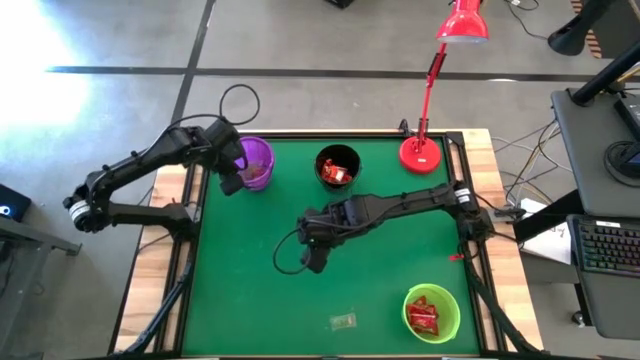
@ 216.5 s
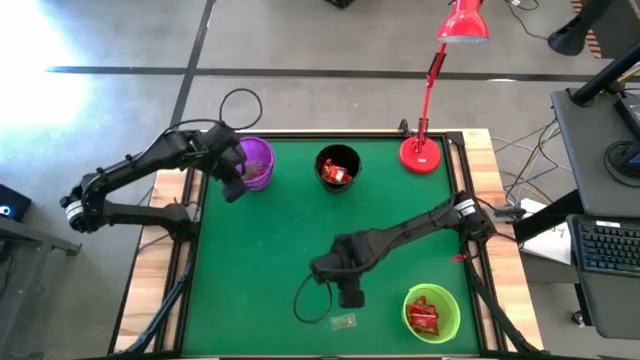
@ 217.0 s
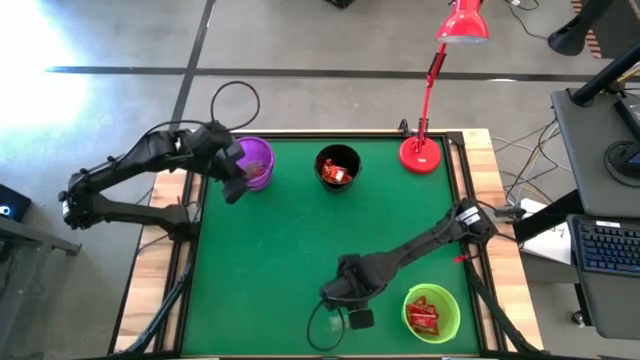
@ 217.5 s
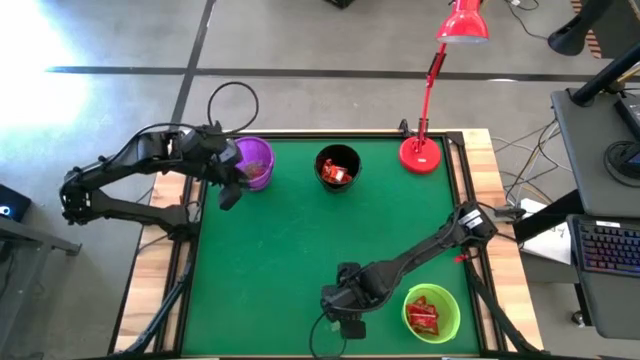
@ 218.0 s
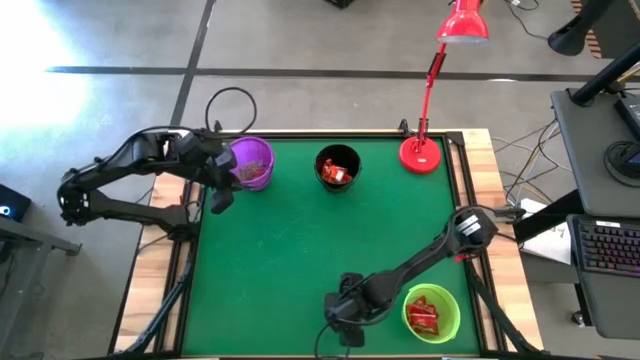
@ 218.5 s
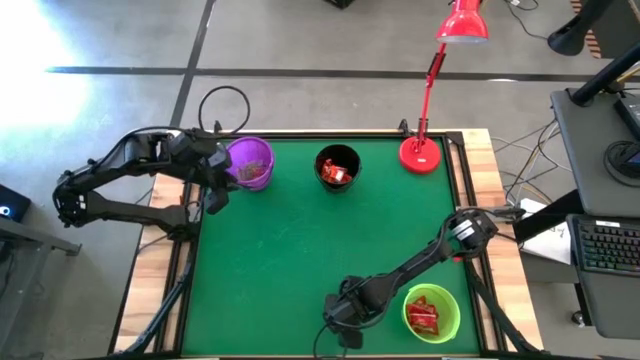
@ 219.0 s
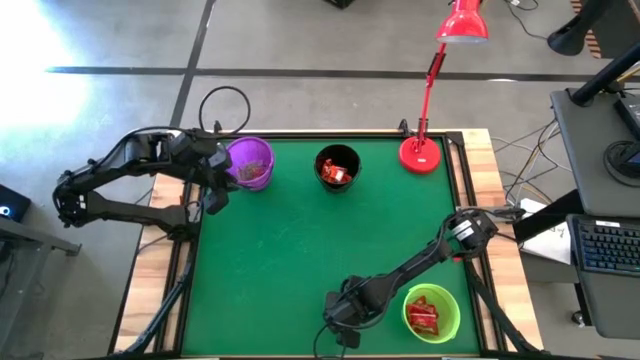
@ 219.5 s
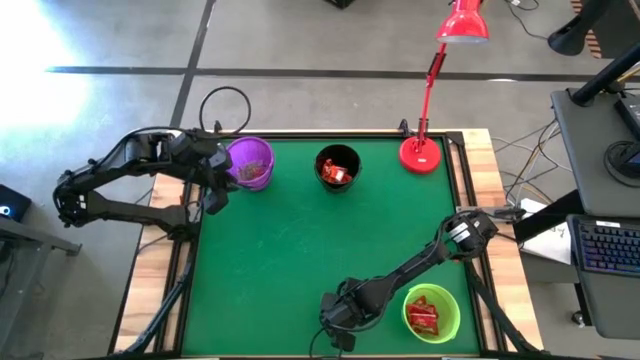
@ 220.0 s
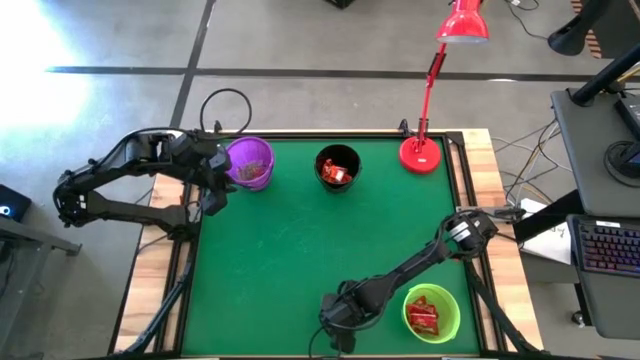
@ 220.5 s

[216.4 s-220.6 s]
Task: Sort candy
Put the green gummy into the violet bucket

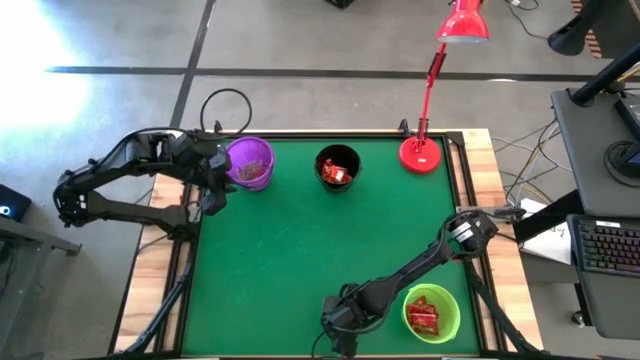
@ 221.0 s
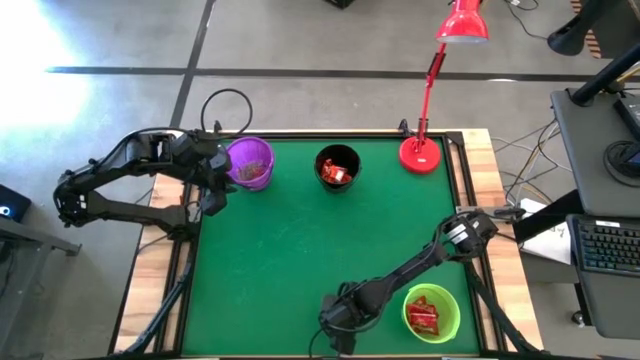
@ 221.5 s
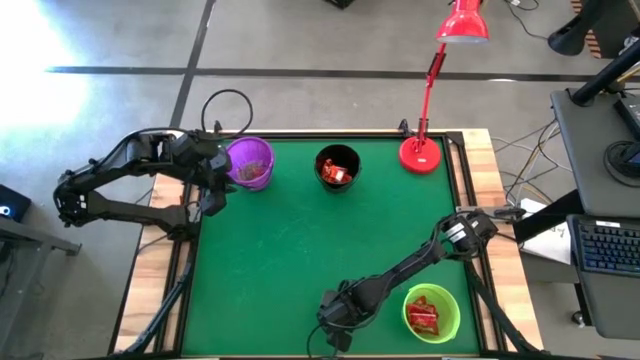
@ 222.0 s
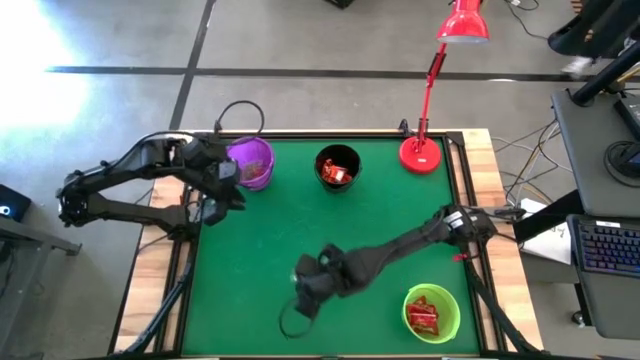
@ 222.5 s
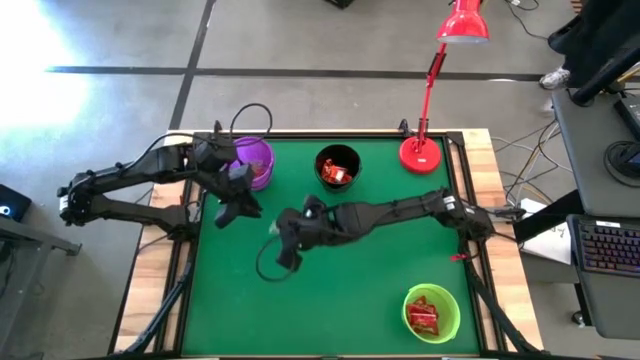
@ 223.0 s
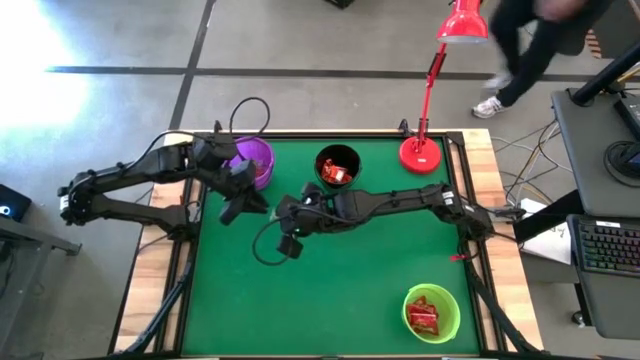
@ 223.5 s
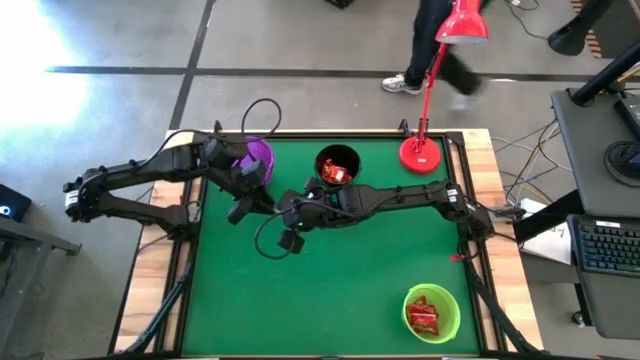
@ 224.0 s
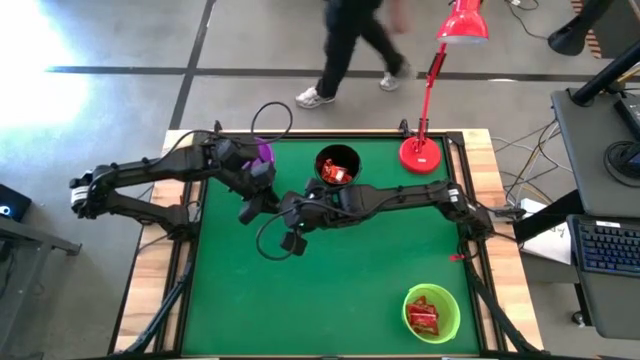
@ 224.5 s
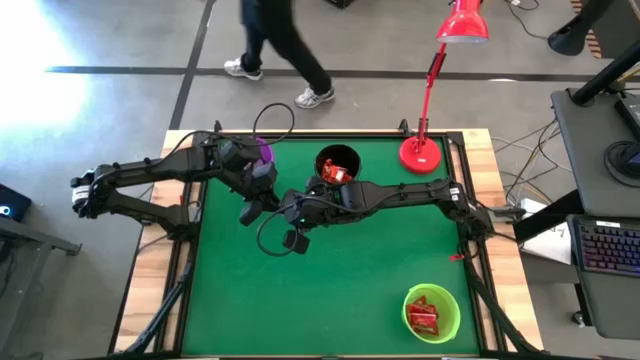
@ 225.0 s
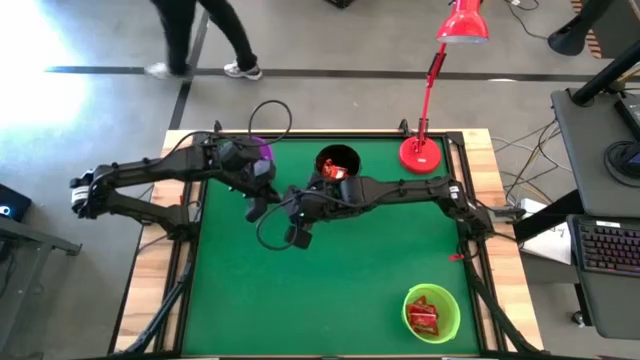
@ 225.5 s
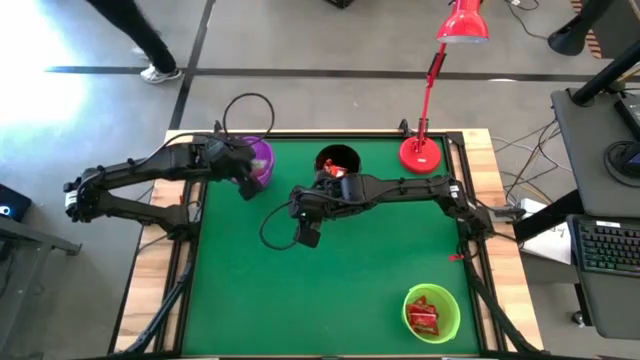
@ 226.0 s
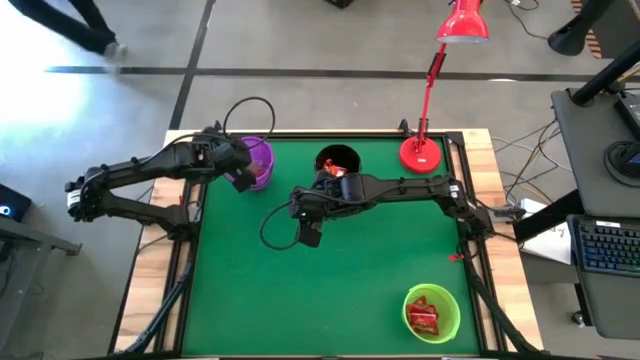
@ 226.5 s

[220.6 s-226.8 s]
Put the green gummy into the violet bucket

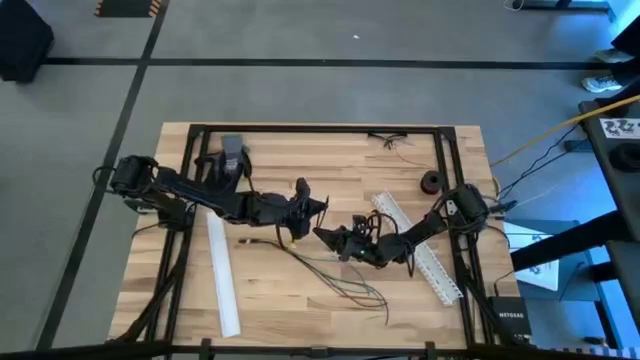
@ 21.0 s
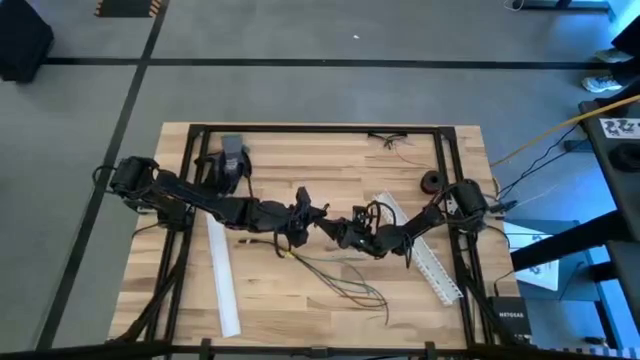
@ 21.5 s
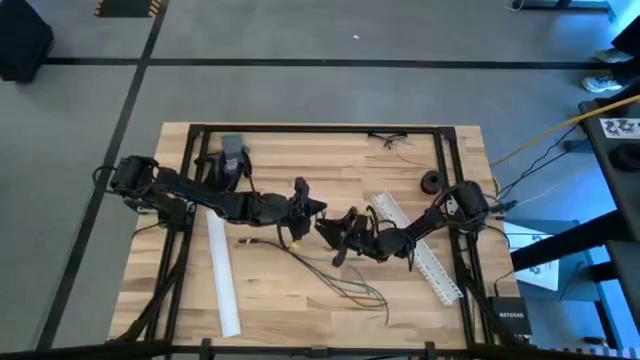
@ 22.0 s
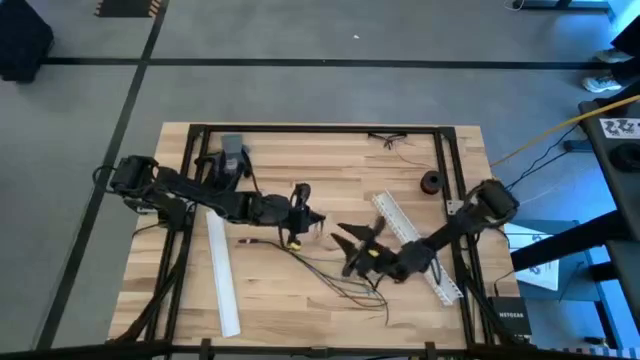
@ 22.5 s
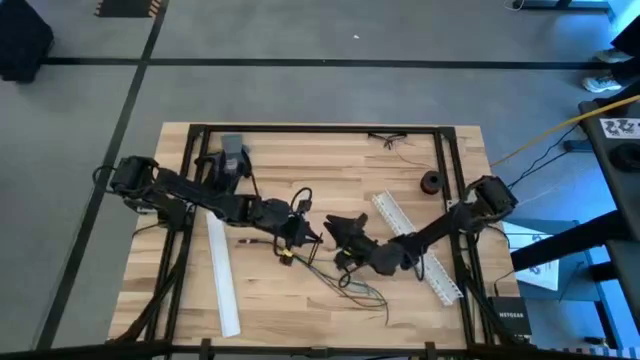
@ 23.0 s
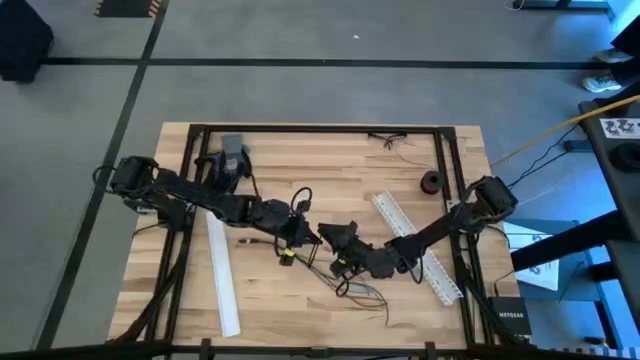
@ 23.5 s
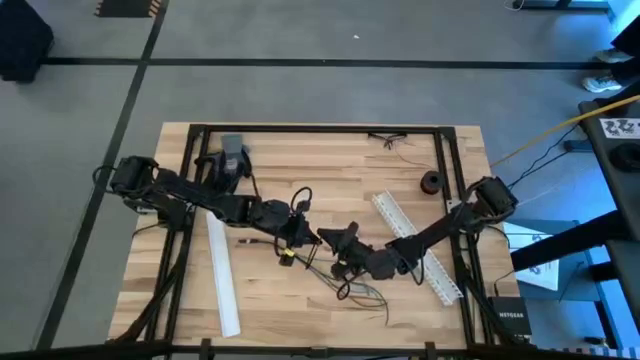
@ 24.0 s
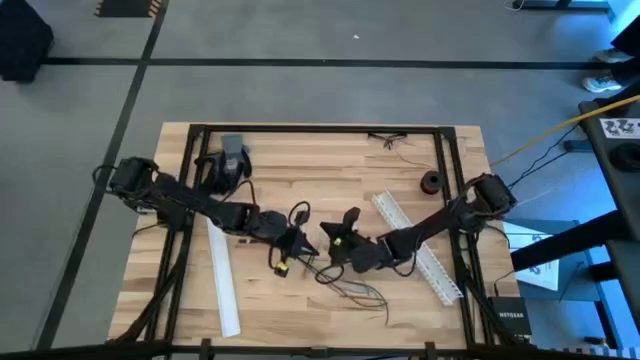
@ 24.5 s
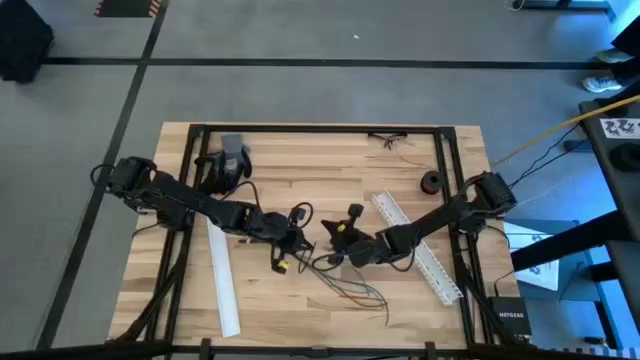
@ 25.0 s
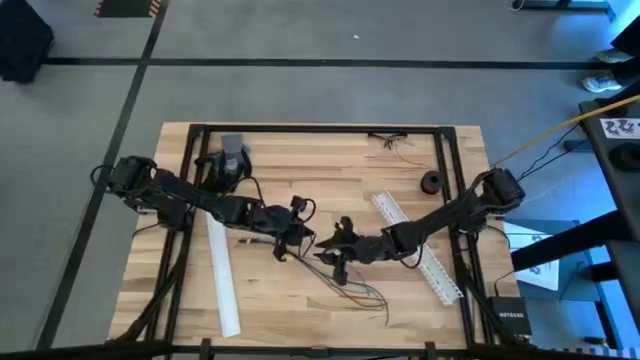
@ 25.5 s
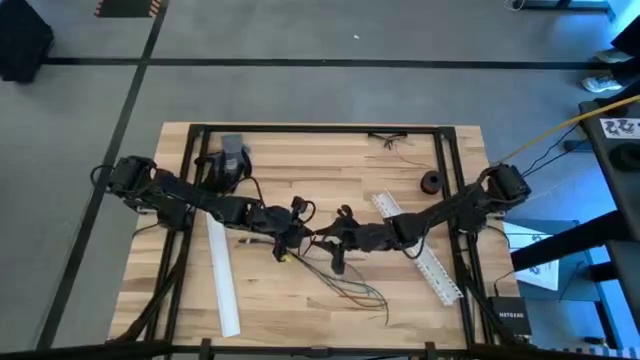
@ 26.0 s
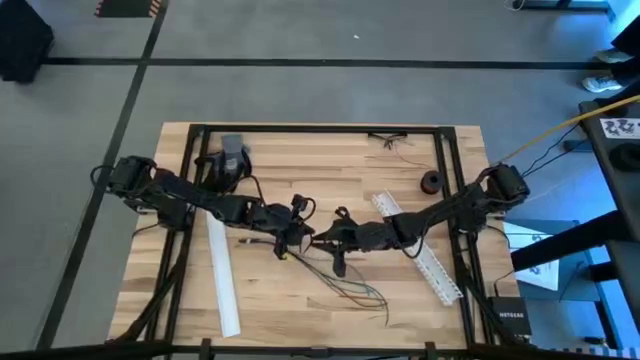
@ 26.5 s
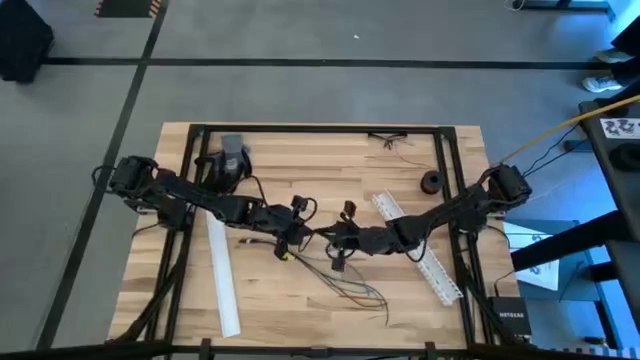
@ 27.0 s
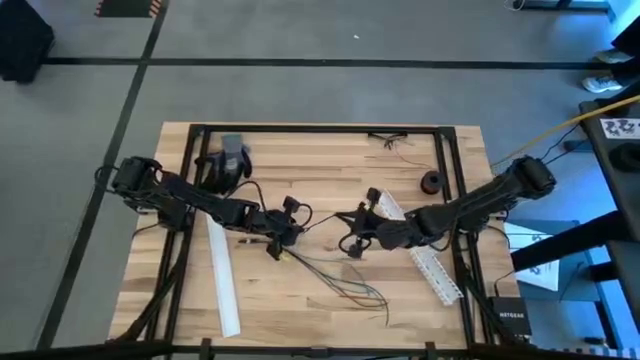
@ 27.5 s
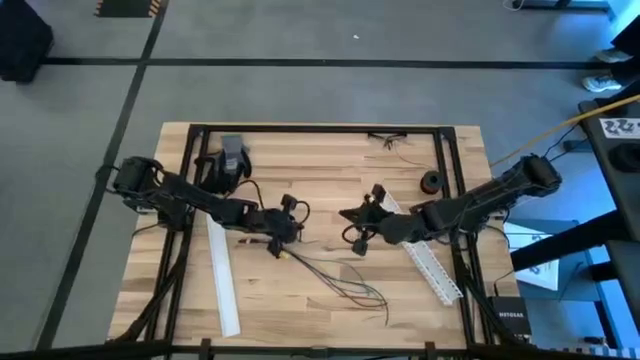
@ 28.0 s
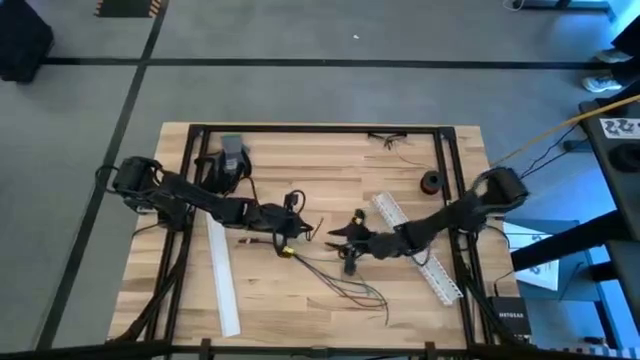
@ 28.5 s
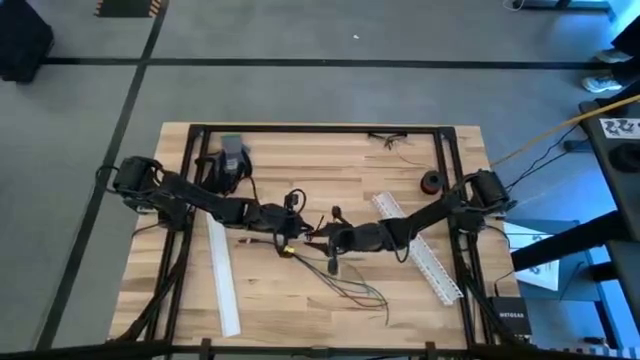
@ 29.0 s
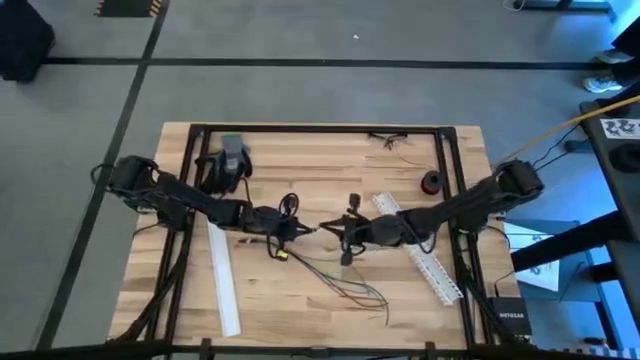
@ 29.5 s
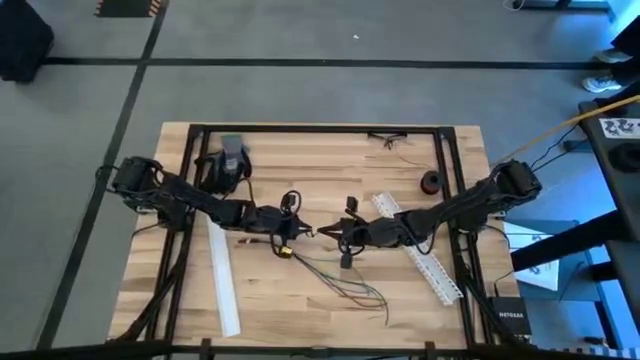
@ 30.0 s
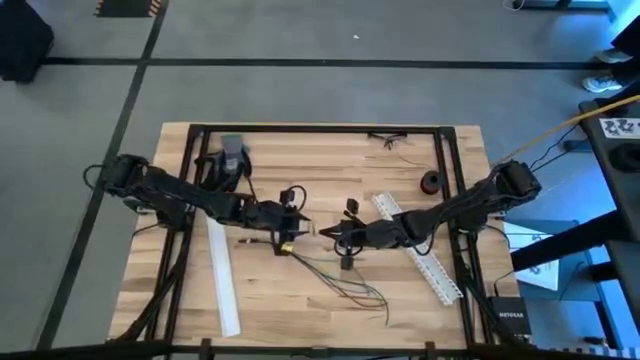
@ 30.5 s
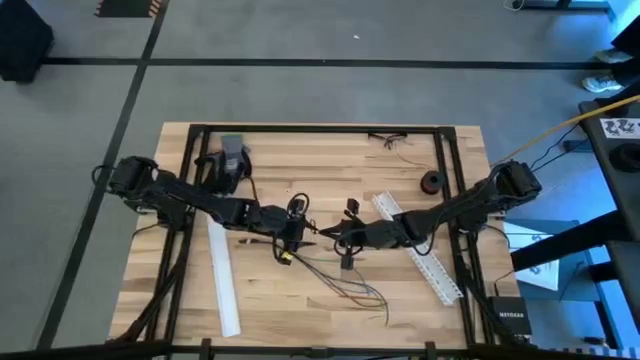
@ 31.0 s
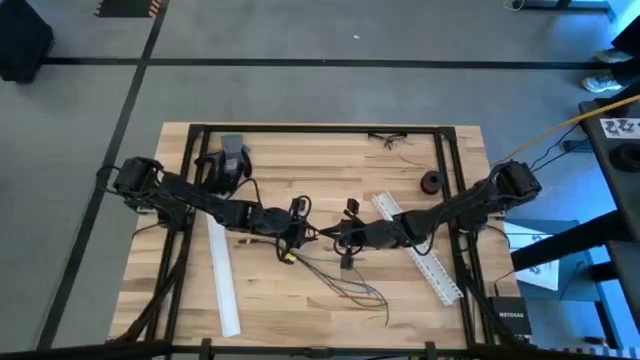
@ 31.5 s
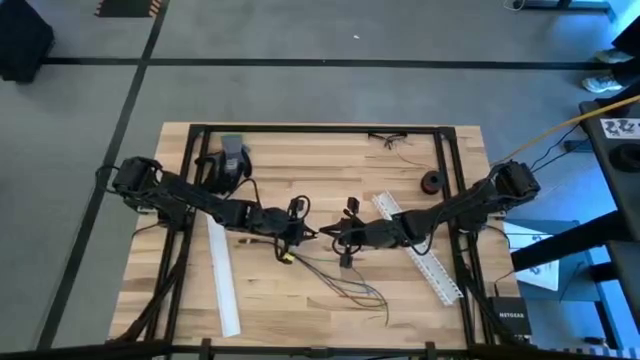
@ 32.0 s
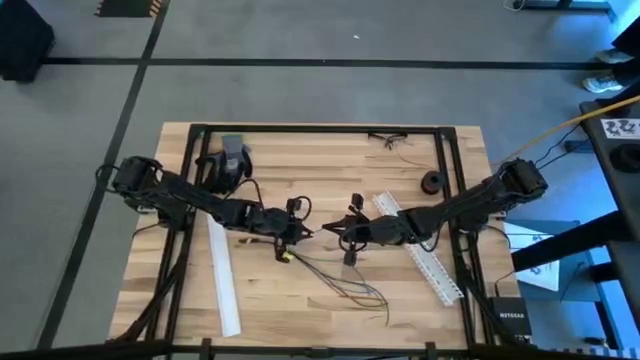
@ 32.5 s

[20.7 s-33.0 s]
Task: Ziptie cables
Prepare the black ziptie
